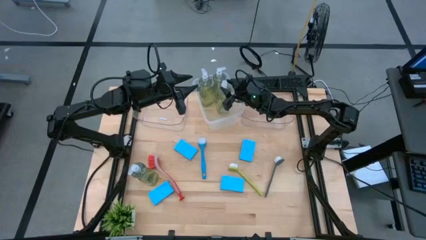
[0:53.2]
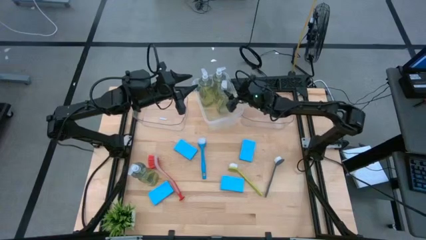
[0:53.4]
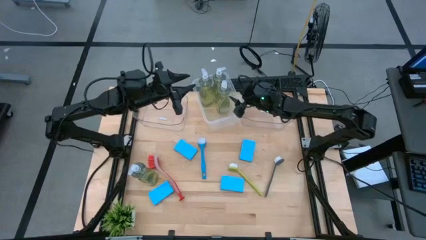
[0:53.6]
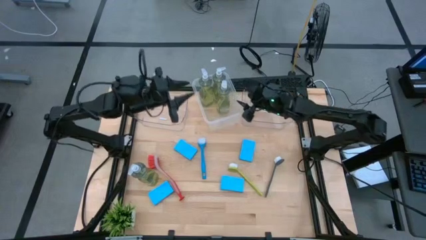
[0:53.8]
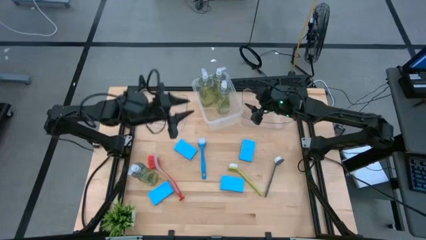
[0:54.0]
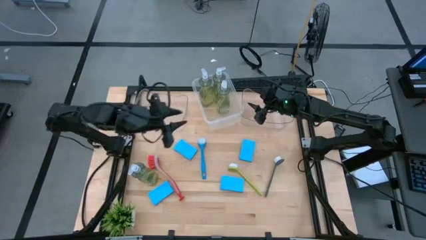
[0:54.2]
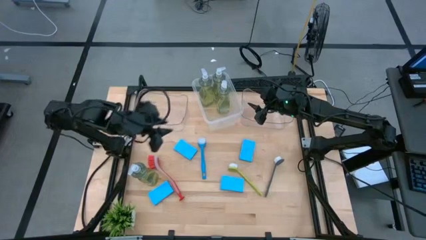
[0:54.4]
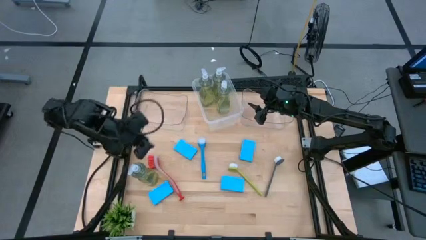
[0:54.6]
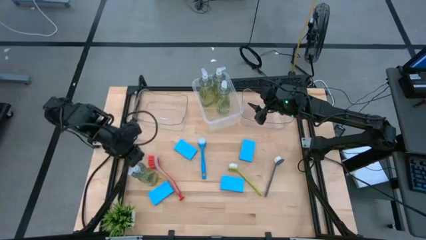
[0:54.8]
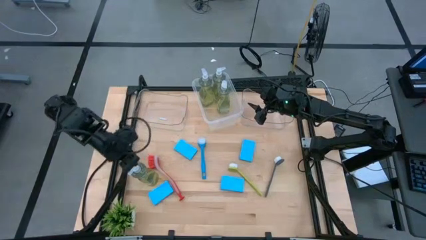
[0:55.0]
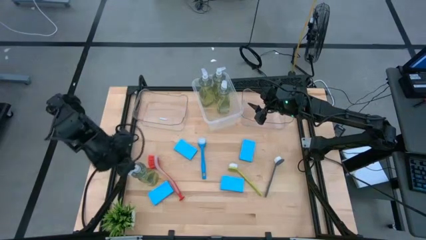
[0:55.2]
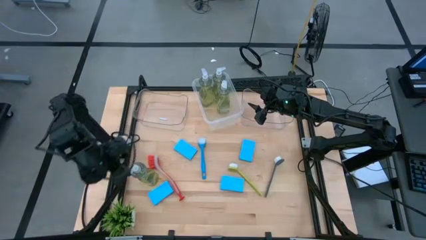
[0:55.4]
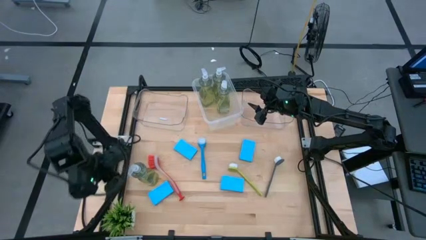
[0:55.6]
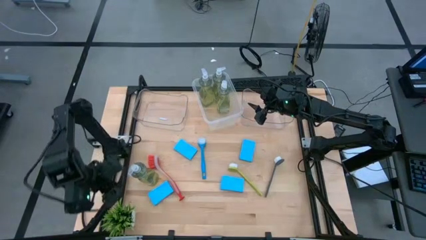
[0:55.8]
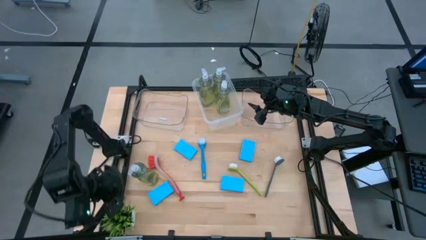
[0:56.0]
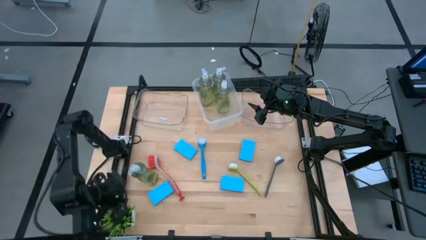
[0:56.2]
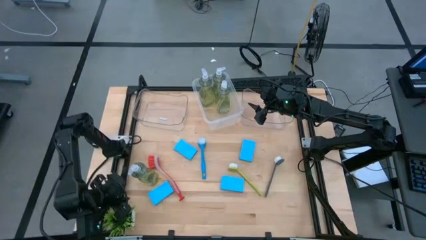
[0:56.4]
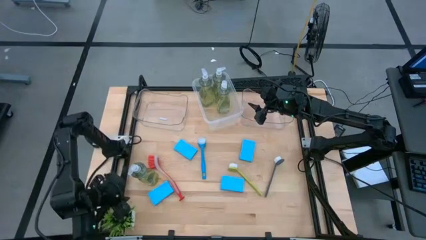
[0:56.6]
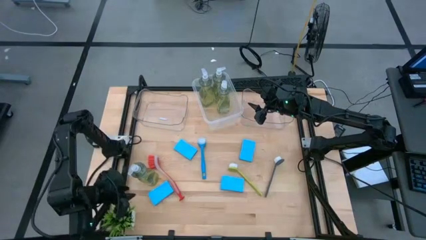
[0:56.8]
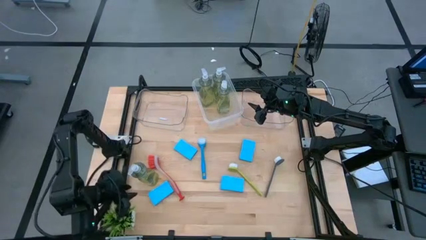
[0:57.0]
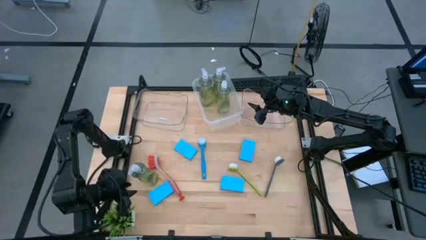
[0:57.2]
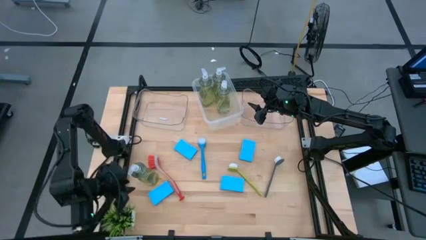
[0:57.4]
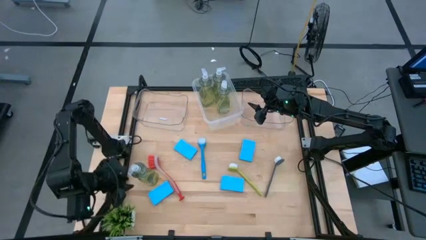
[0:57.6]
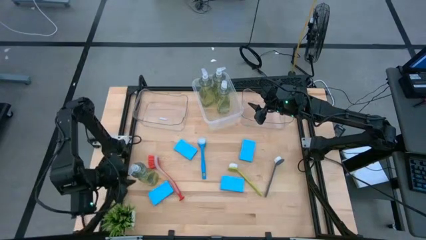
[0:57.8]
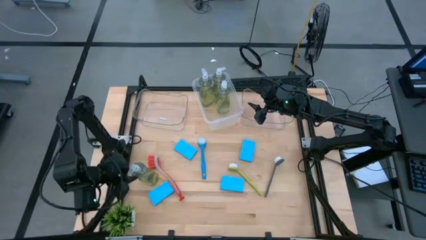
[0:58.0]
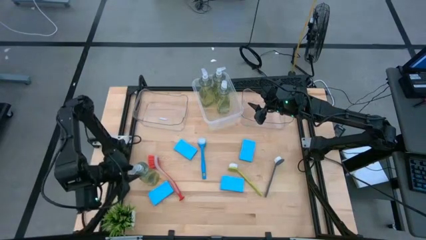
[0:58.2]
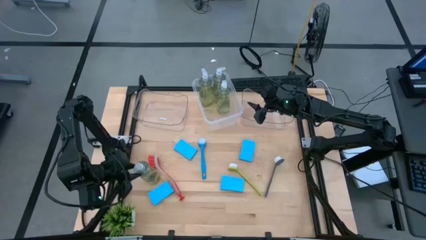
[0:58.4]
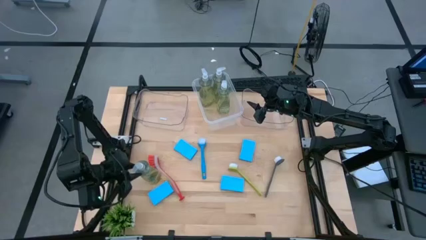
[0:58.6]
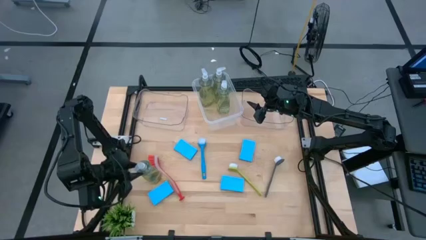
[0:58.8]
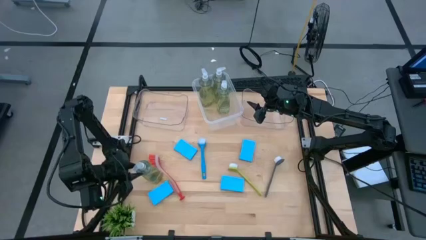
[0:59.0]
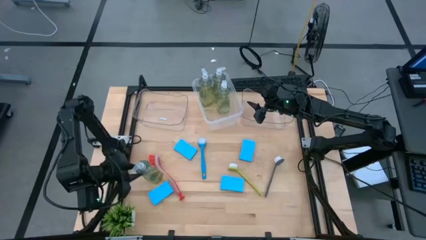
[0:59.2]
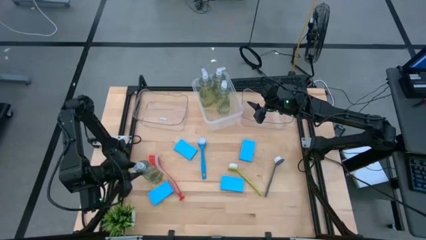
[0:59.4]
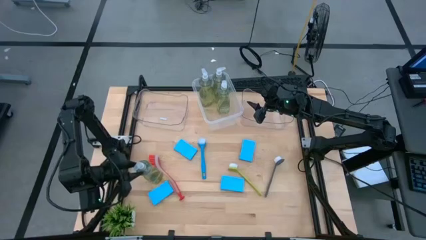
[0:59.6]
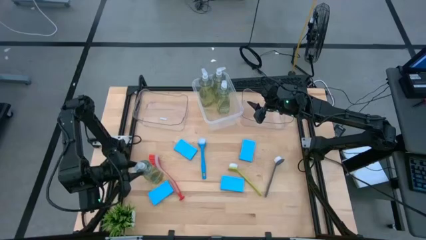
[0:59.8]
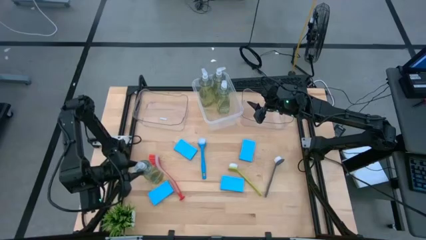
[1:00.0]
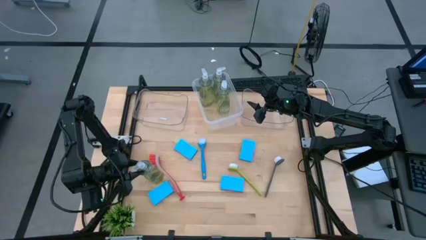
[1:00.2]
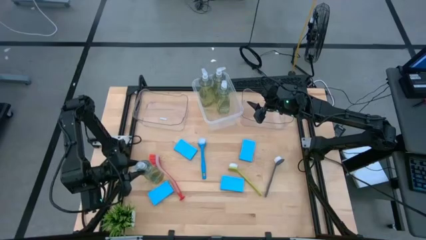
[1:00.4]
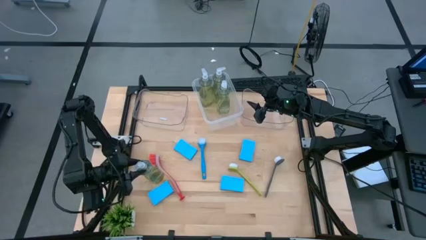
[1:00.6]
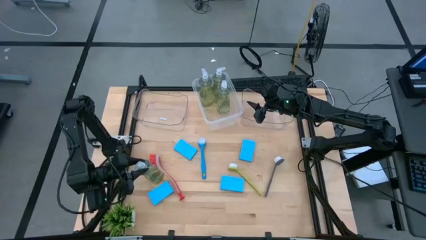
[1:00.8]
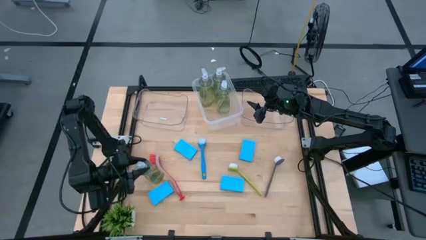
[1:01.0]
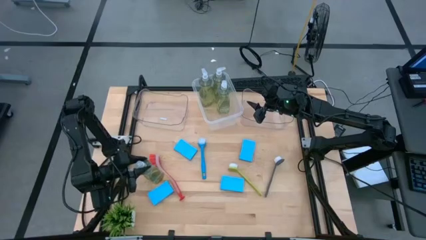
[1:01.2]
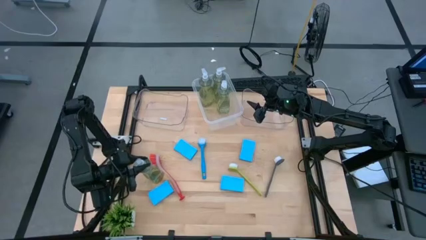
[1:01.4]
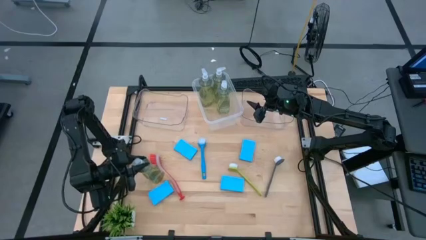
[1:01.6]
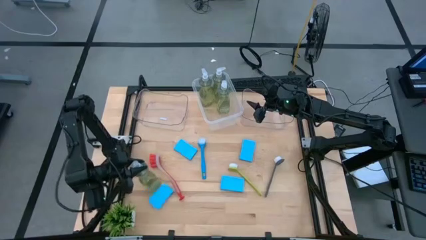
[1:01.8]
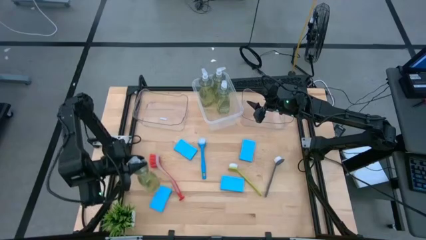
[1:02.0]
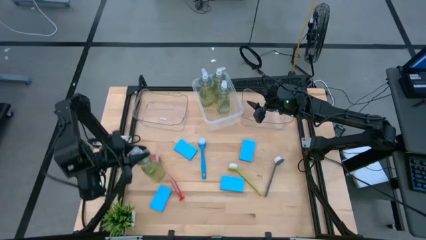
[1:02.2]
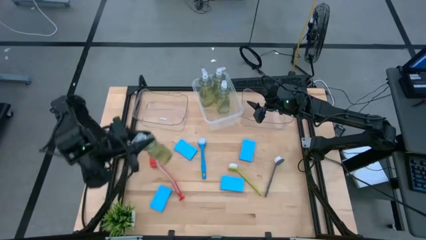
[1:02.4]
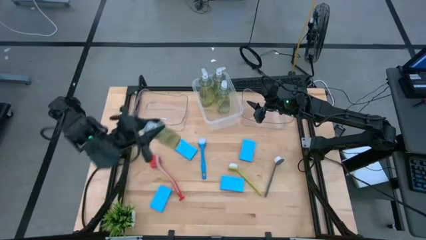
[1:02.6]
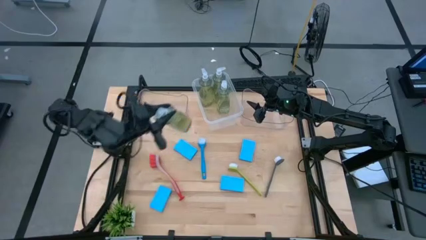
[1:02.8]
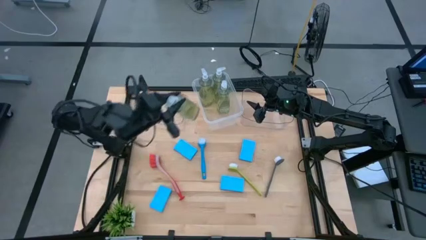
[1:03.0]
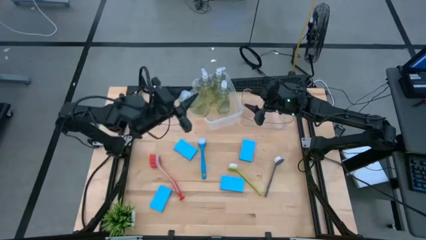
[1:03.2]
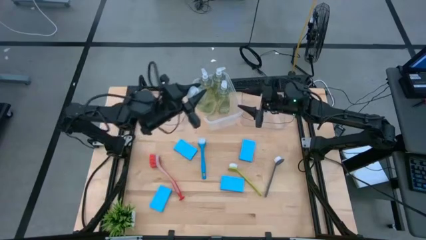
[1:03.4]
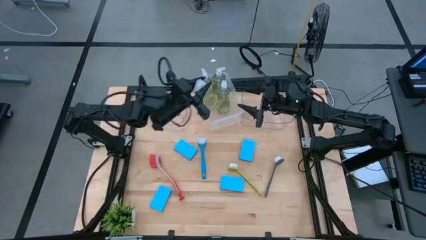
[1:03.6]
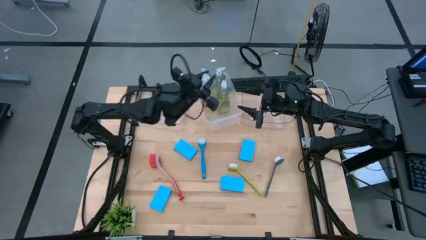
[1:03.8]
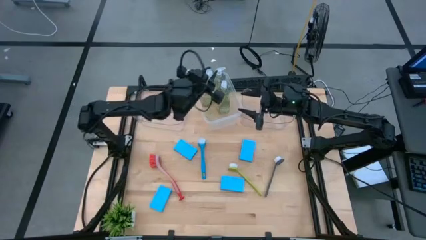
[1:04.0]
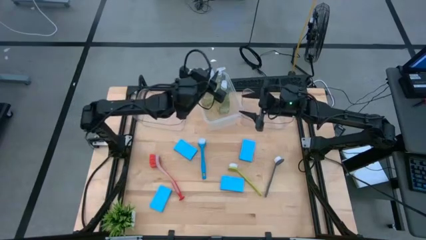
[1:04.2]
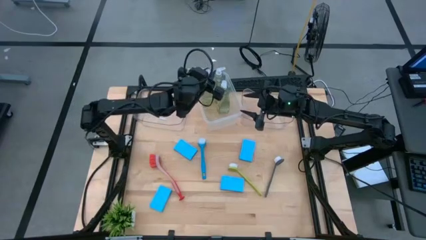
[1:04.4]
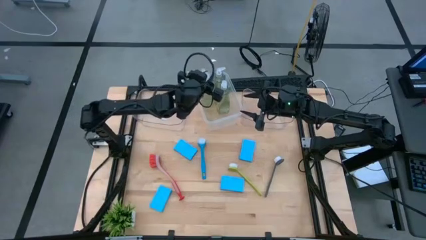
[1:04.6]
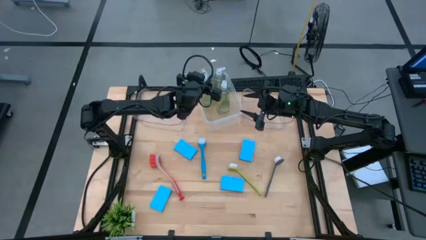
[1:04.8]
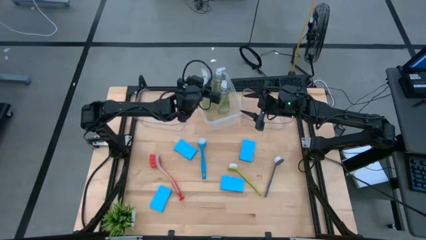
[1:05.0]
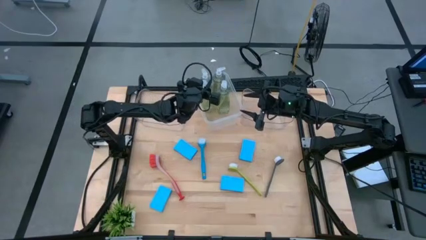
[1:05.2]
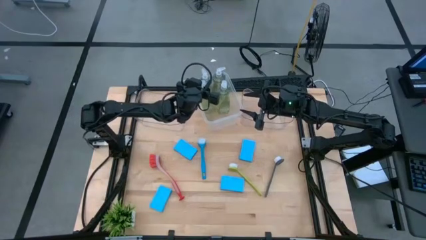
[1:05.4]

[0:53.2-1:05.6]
Task: Pick & Place Kitchen Sink Supplies
Put the yellow soap dispenser into the white bin
